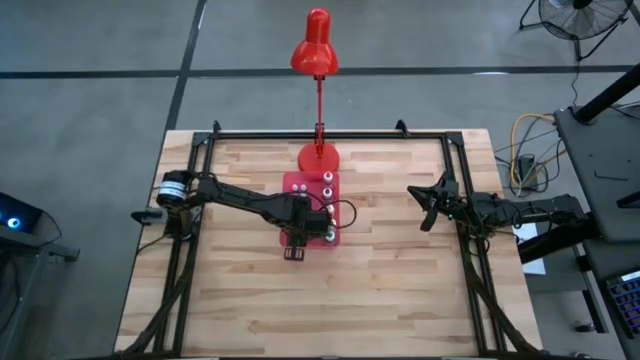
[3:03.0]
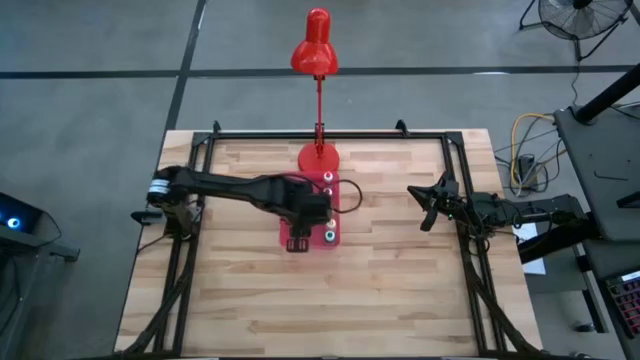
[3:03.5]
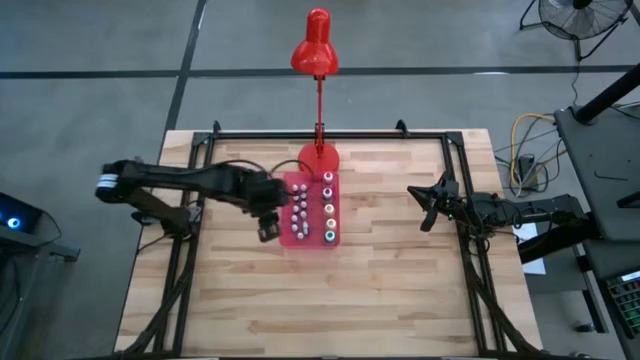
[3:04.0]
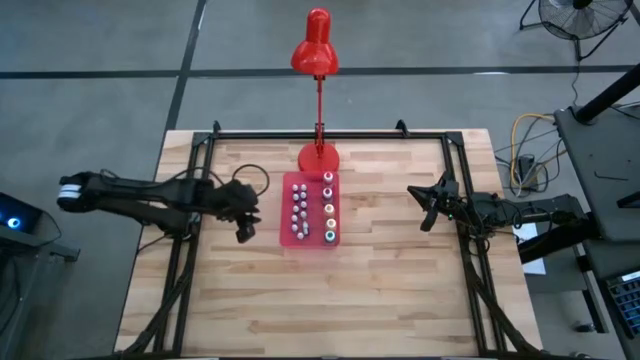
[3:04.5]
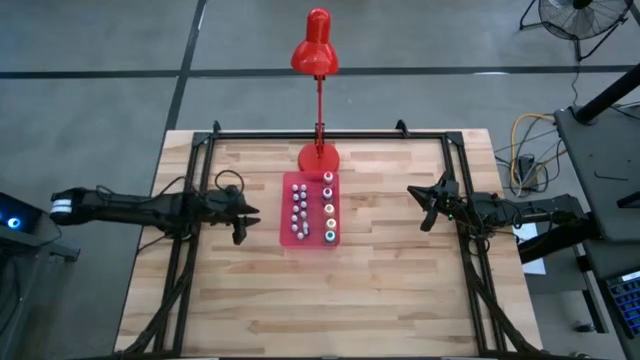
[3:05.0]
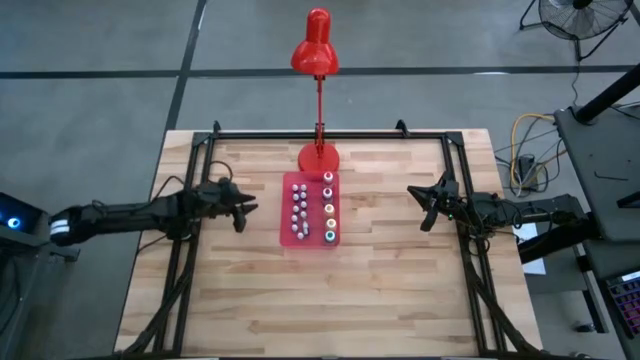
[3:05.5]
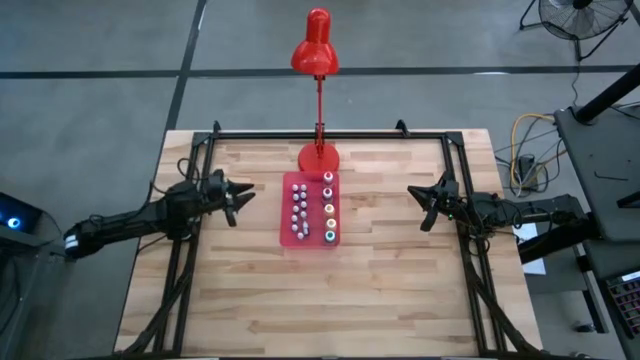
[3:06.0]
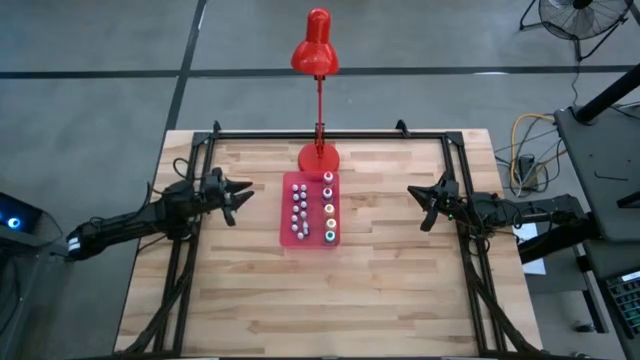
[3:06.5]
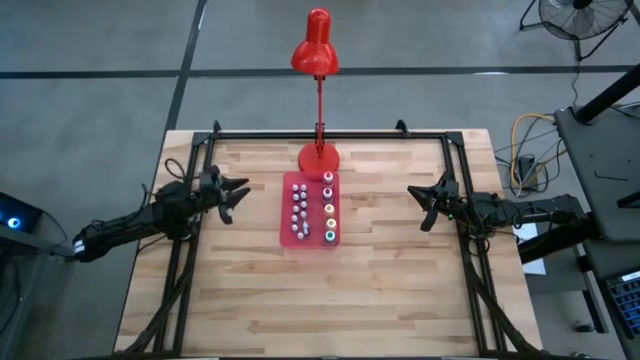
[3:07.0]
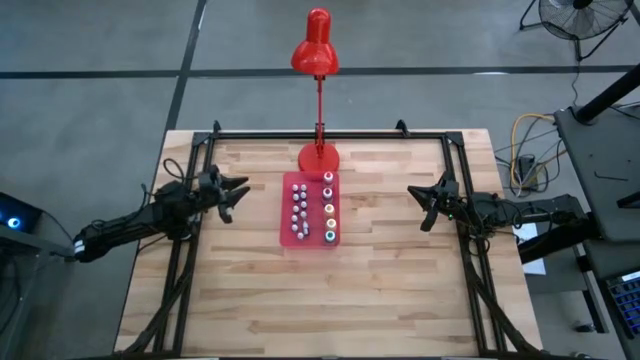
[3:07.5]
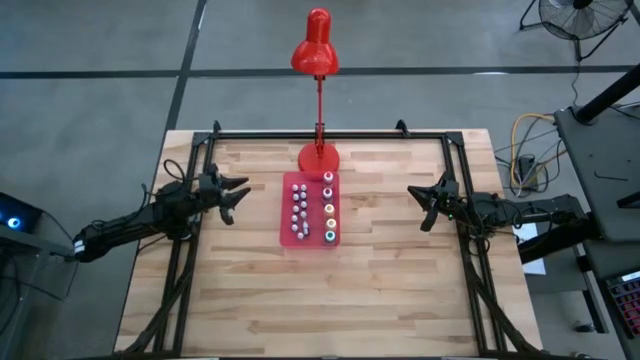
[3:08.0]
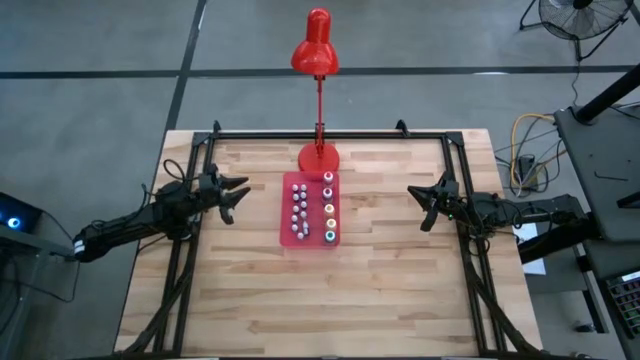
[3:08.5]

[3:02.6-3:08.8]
Task: Pick & Place food coloring
Return to Home Position

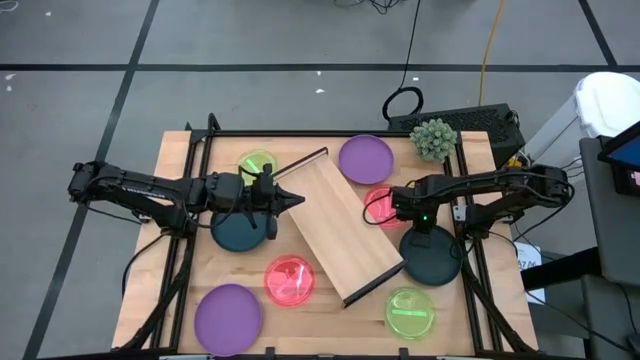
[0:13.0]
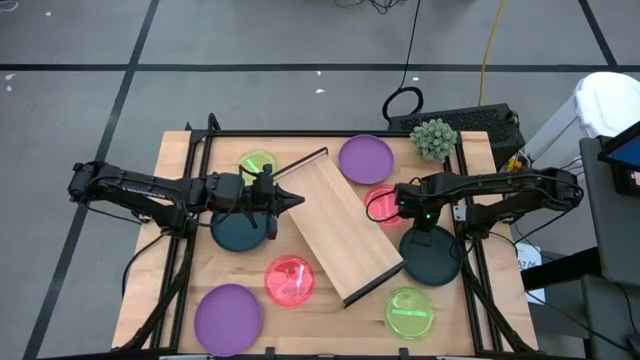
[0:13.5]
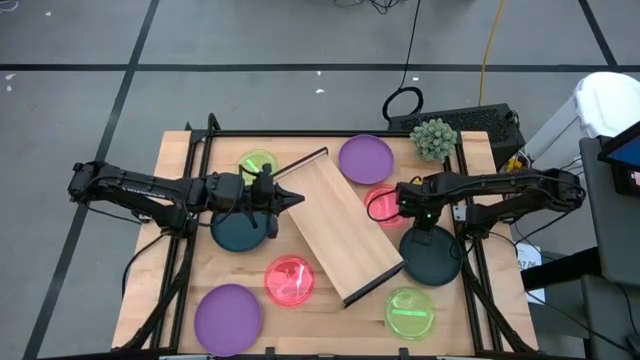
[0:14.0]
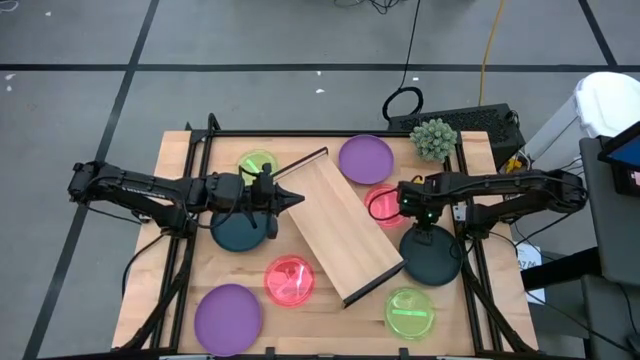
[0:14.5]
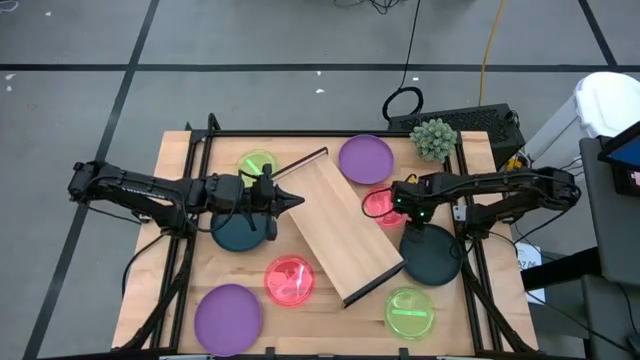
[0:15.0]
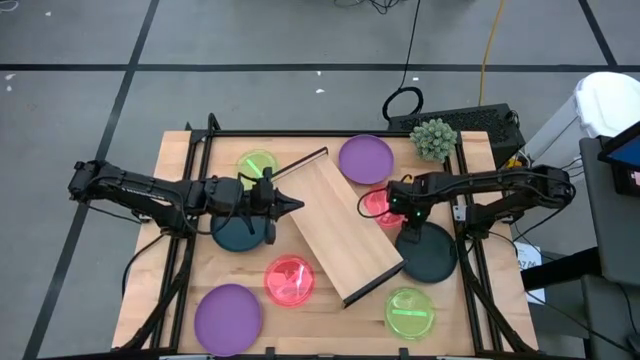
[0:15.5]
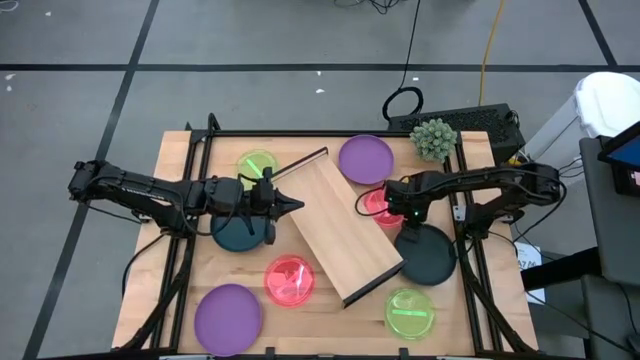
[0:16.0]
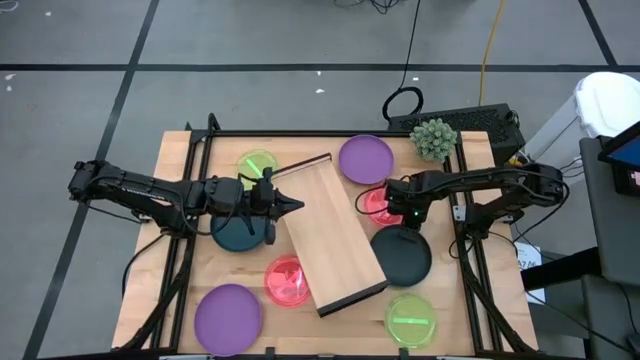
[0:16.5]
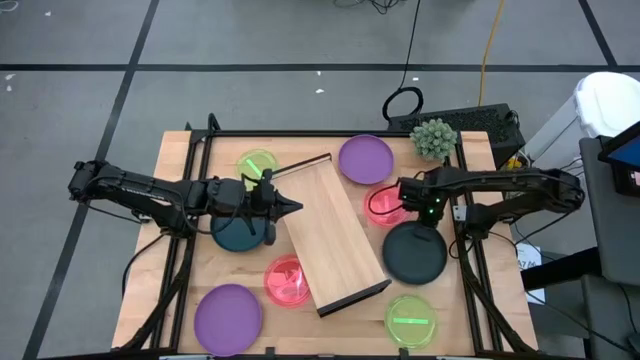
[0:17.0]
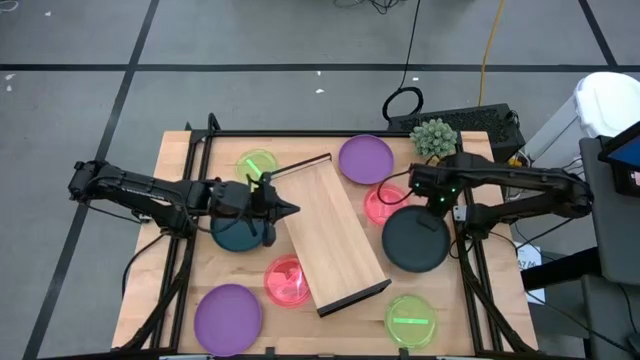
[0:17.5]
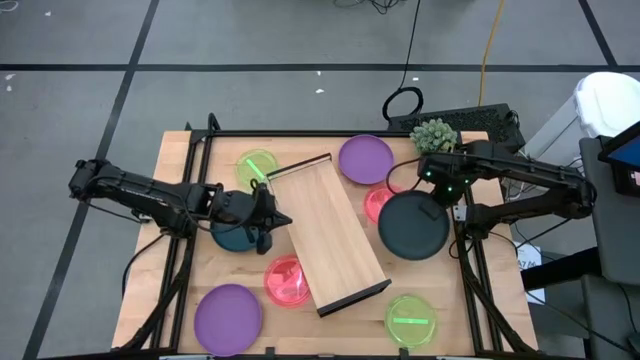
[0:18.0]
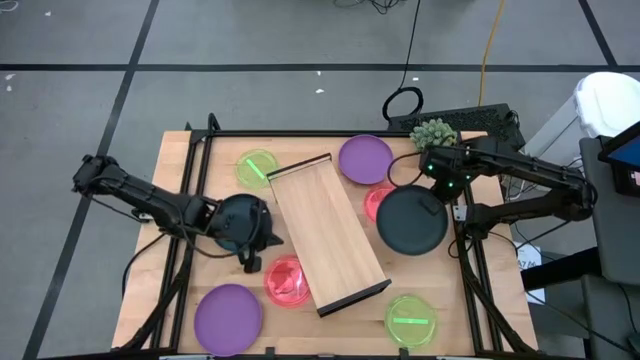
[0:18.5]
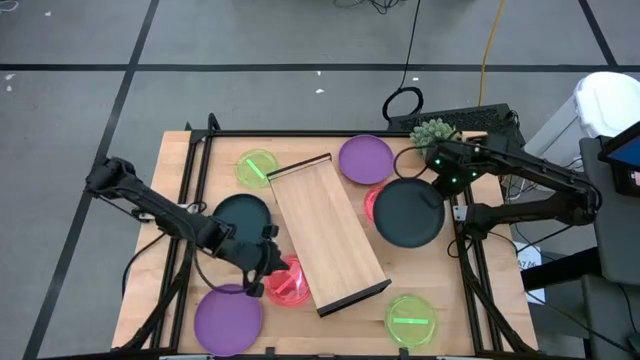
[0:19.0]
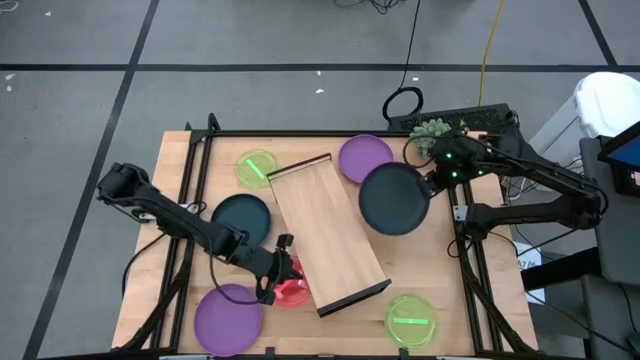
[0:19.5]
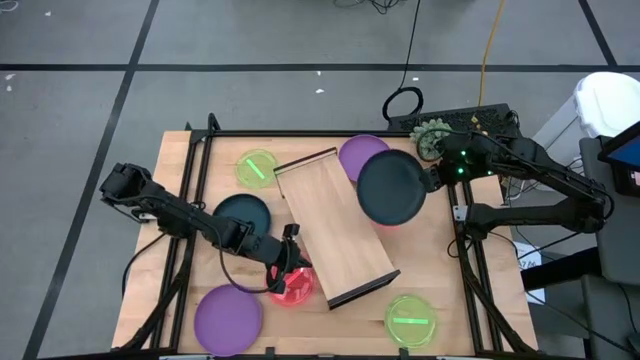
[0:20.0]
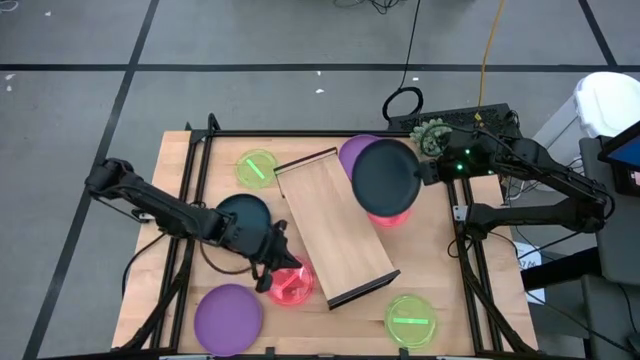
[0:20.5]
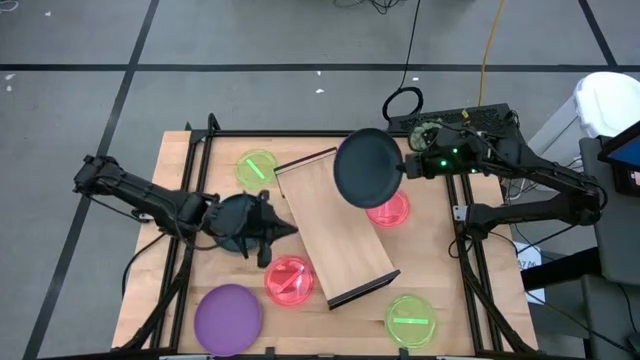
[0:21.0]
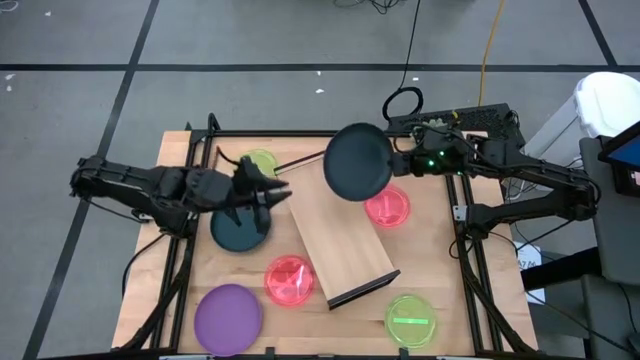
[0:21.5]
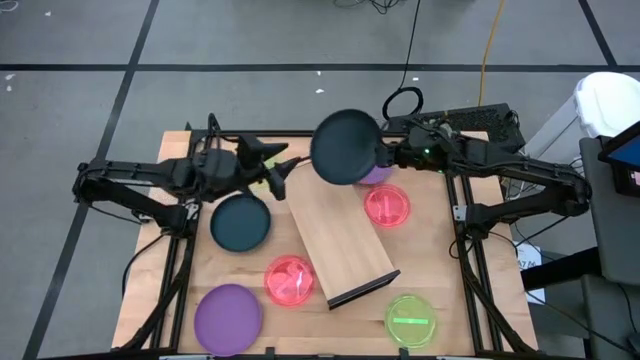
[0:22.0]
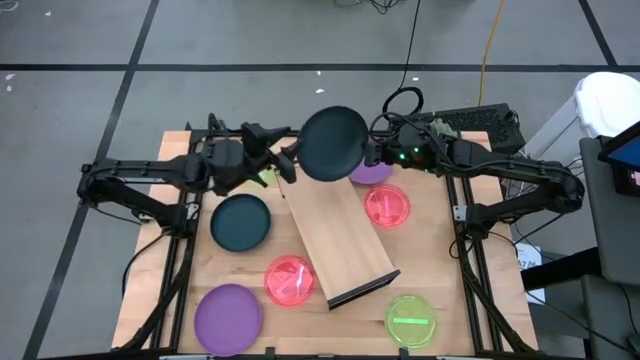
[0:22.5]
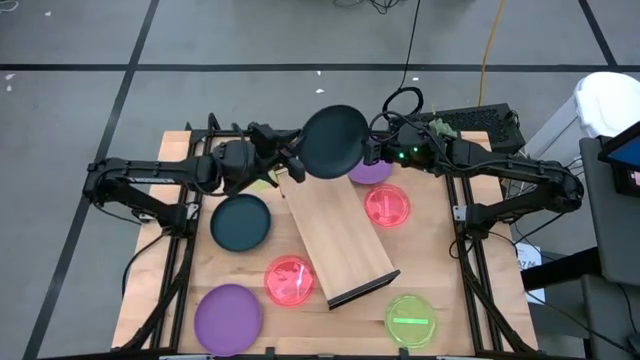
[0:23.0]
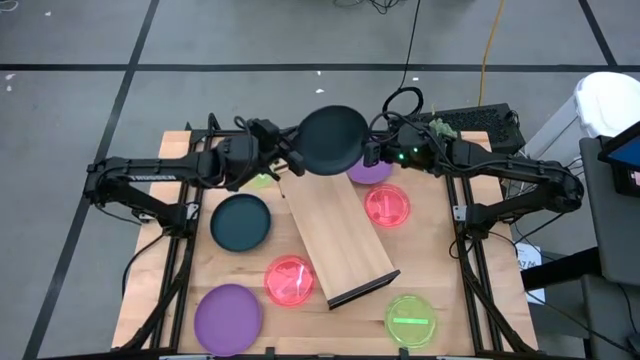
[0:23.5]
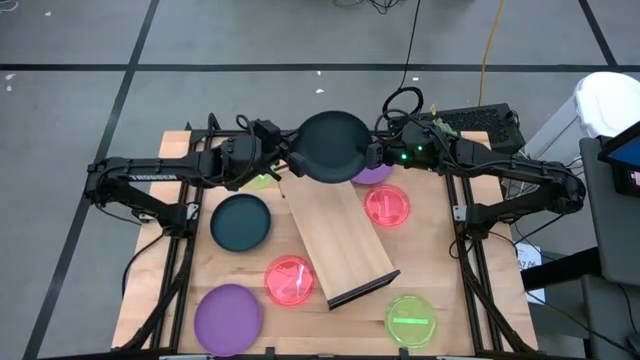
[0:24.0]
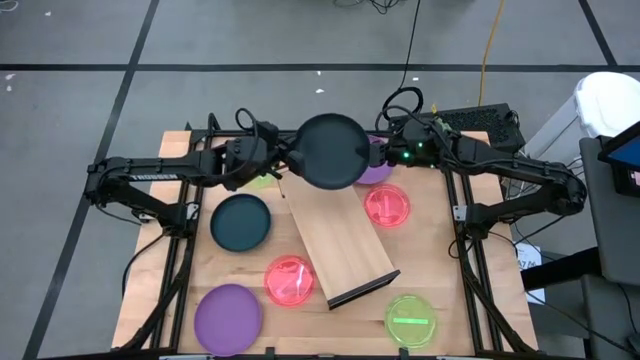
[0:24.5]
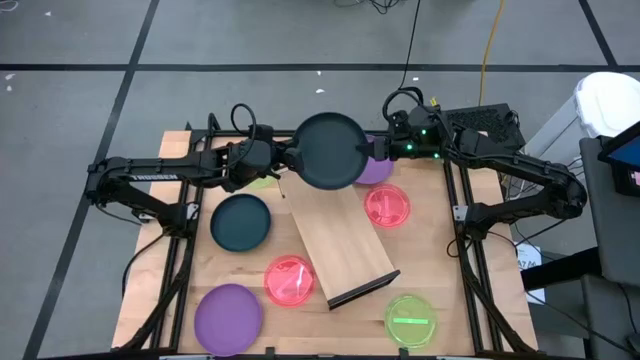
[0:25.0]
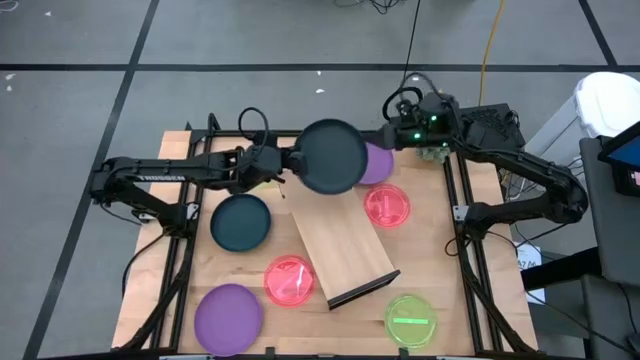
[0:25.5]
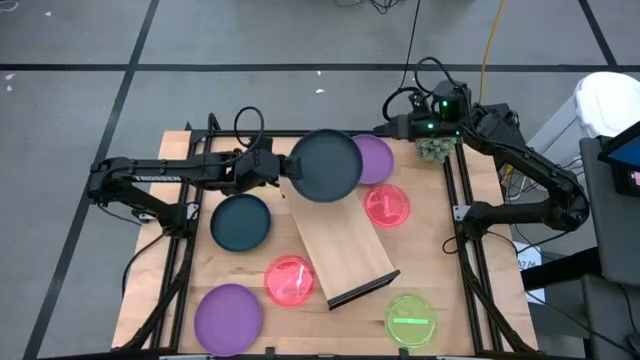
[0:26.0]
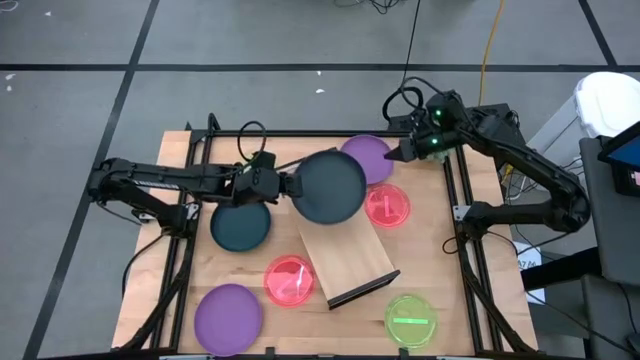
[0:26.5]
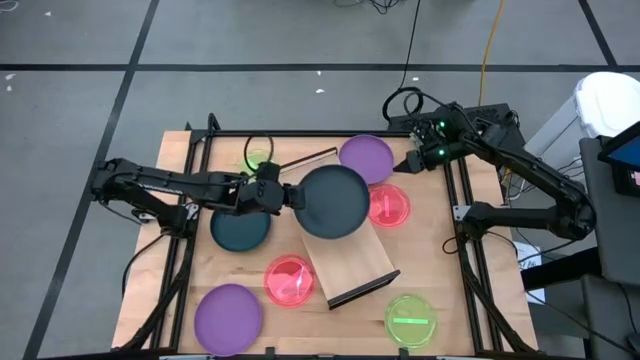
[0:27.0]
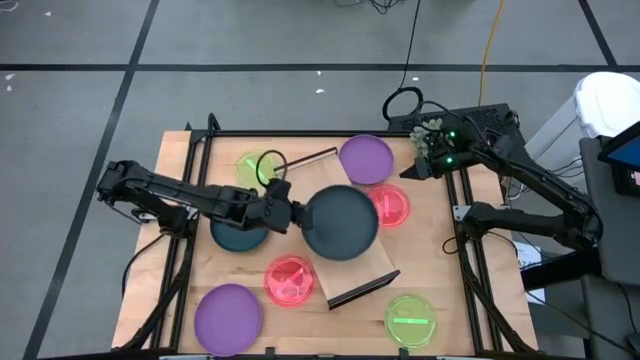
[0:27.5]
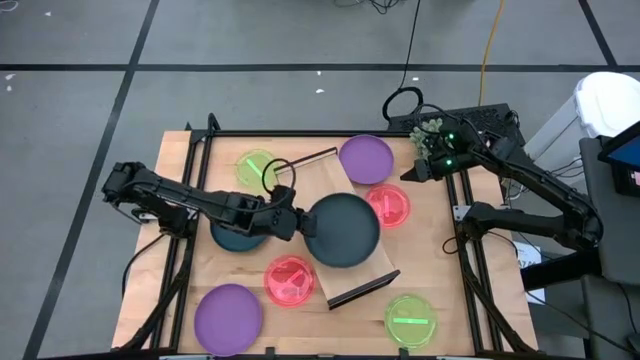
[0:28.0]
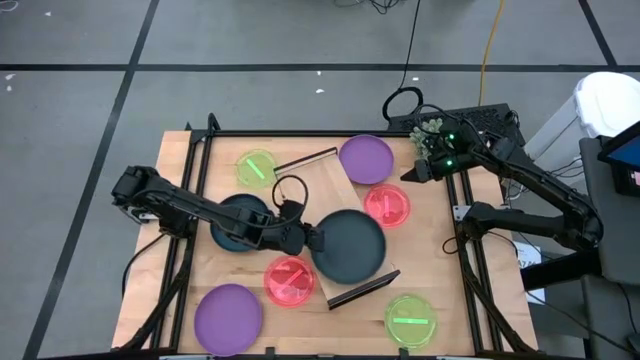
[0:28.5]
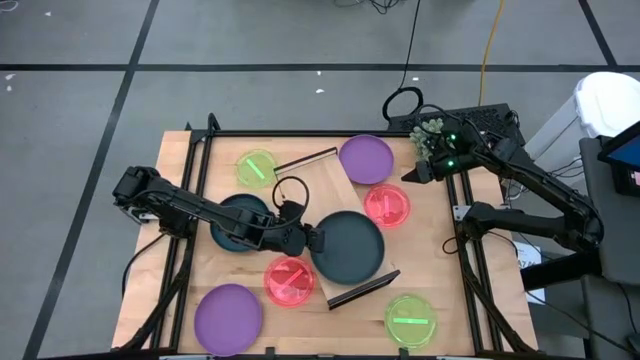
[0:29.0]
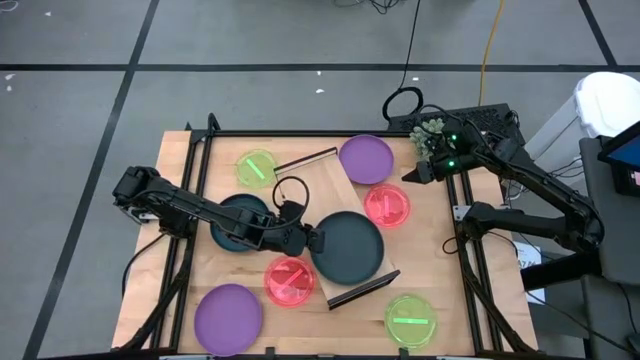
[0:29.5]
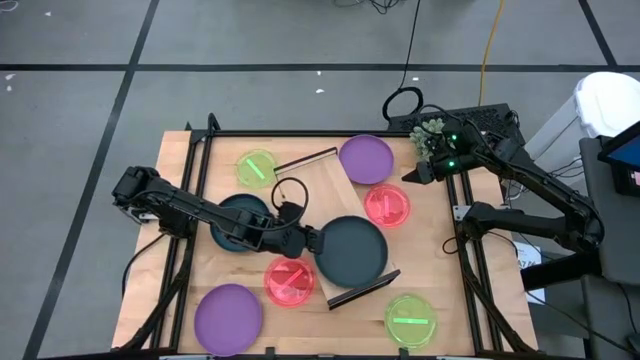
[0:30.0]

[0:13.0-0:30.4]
Task: Place and stack plates onto a shelf
Put the right black plate on the shelf
